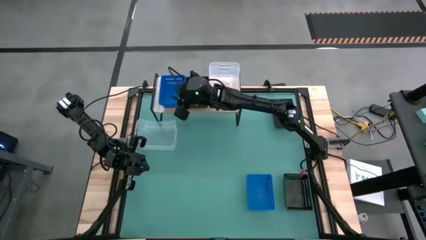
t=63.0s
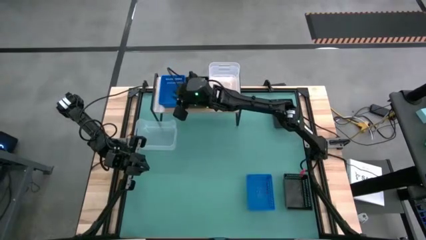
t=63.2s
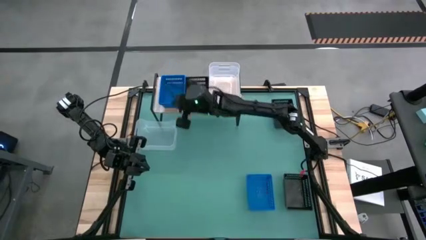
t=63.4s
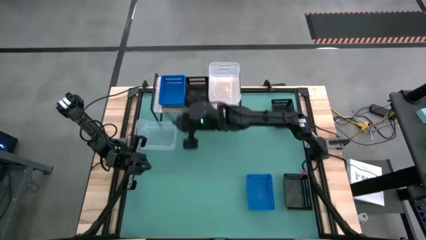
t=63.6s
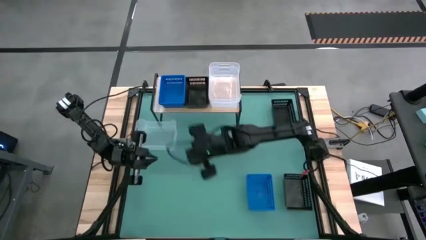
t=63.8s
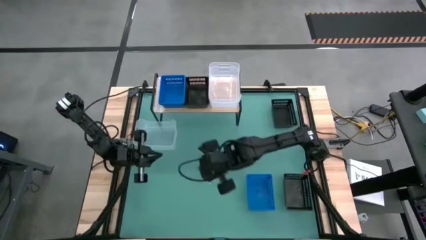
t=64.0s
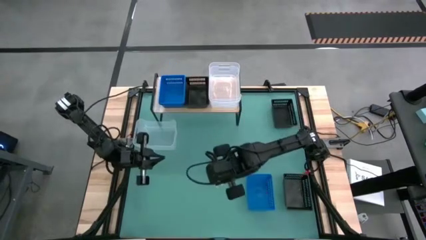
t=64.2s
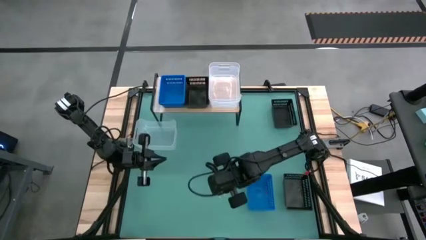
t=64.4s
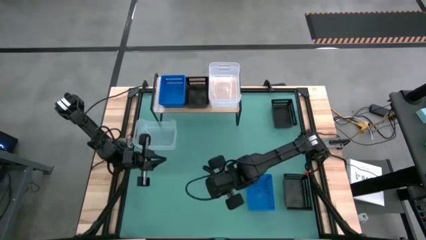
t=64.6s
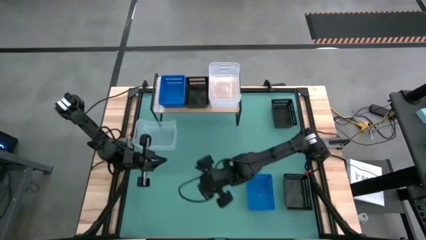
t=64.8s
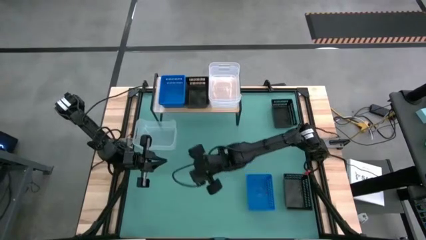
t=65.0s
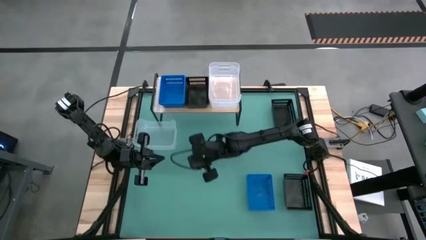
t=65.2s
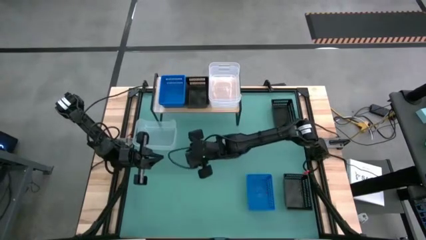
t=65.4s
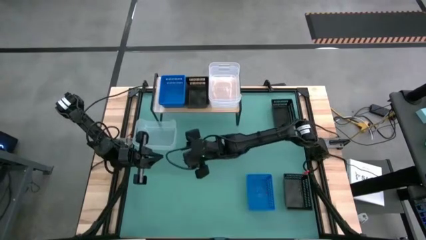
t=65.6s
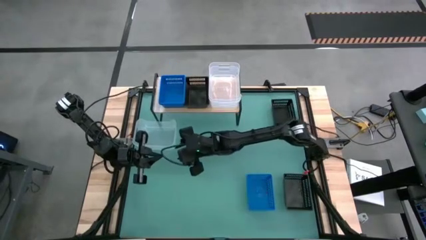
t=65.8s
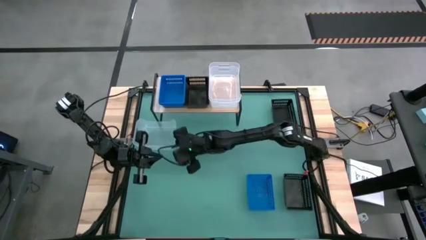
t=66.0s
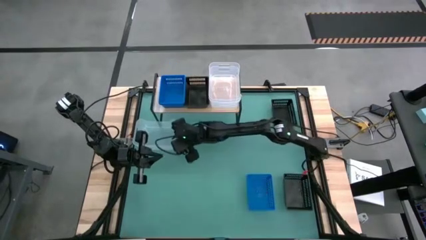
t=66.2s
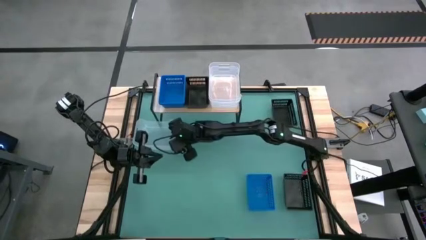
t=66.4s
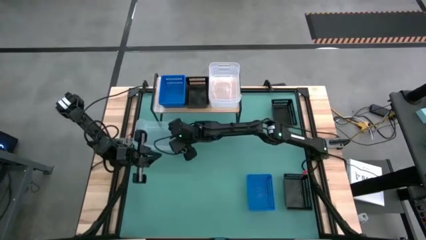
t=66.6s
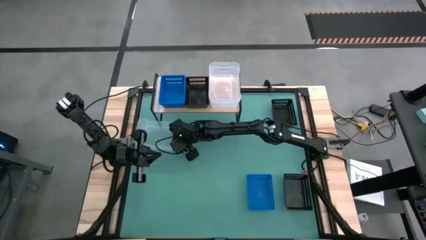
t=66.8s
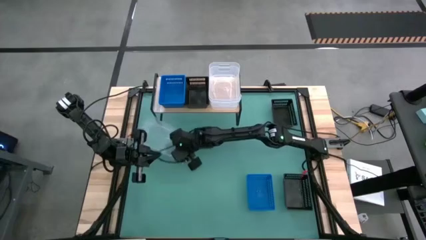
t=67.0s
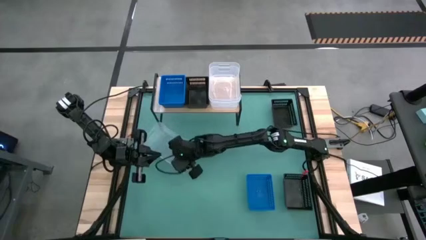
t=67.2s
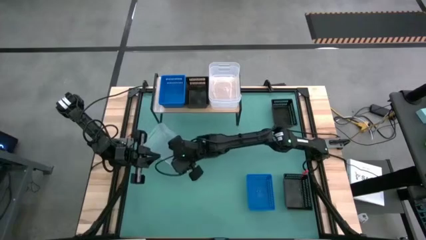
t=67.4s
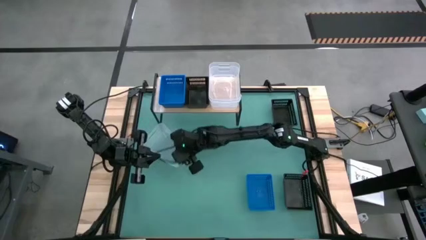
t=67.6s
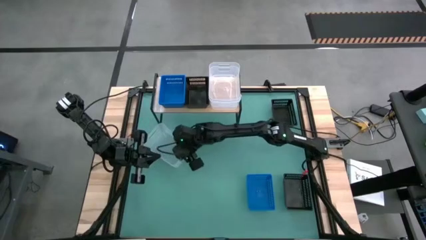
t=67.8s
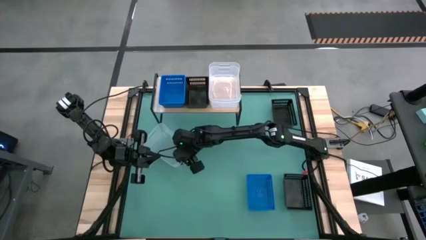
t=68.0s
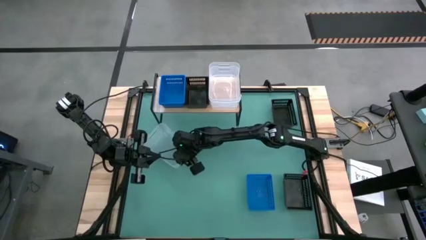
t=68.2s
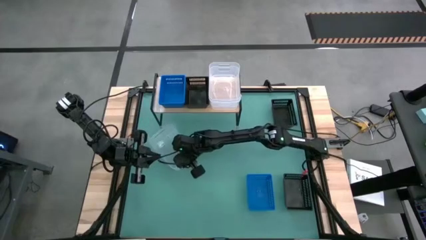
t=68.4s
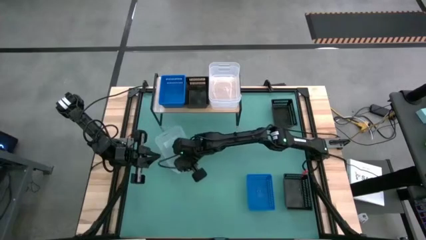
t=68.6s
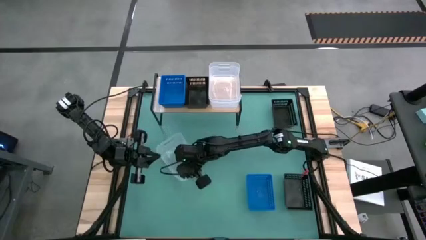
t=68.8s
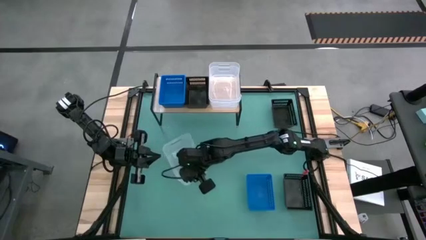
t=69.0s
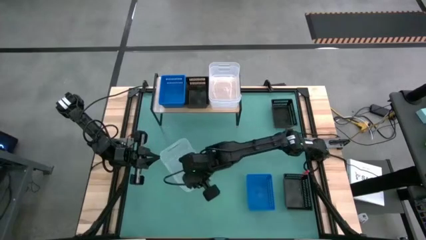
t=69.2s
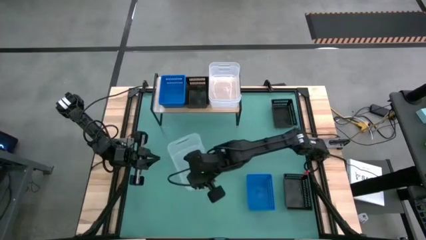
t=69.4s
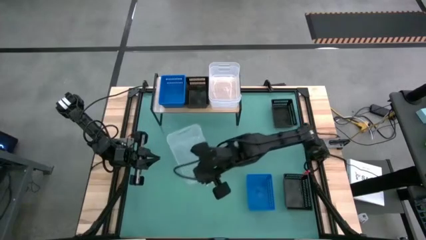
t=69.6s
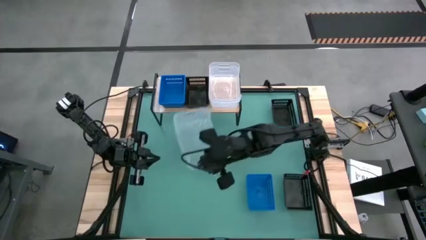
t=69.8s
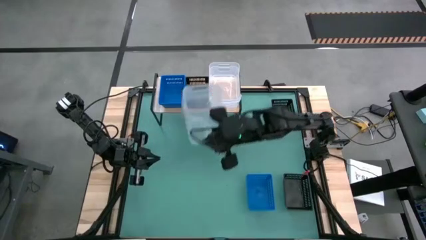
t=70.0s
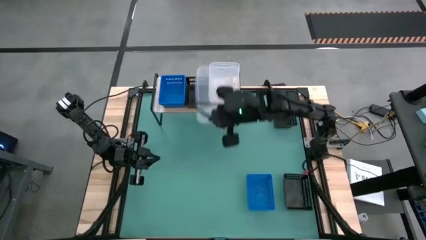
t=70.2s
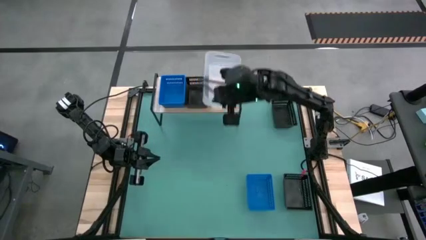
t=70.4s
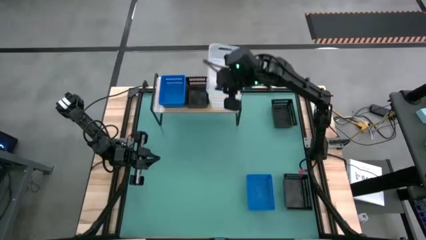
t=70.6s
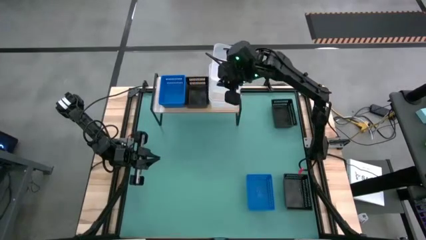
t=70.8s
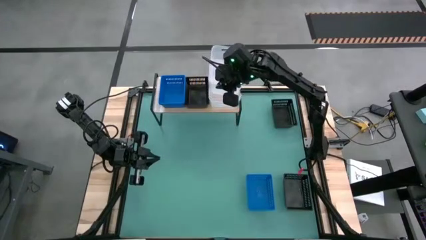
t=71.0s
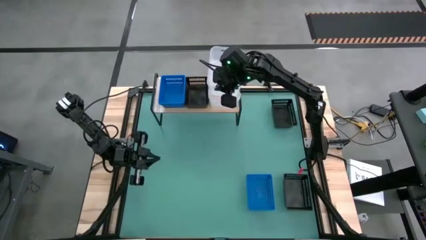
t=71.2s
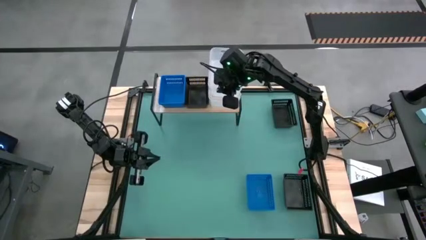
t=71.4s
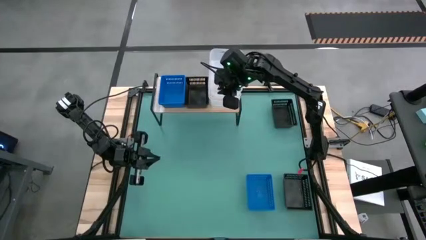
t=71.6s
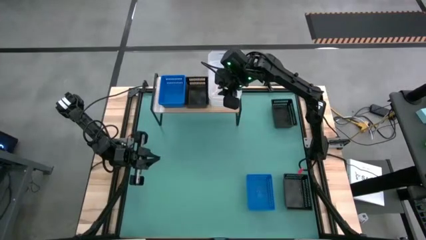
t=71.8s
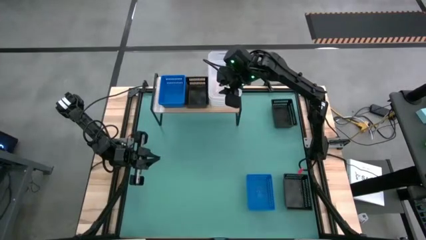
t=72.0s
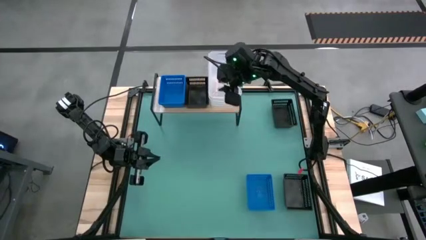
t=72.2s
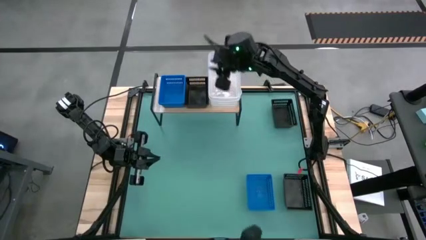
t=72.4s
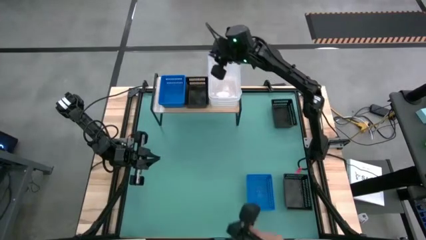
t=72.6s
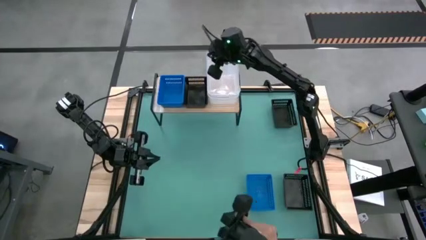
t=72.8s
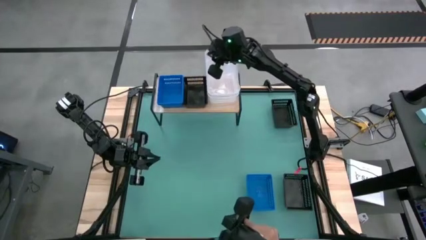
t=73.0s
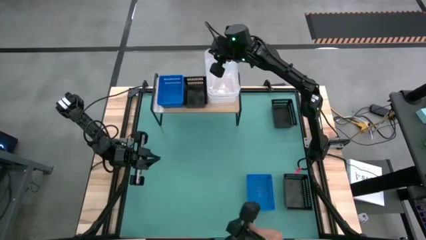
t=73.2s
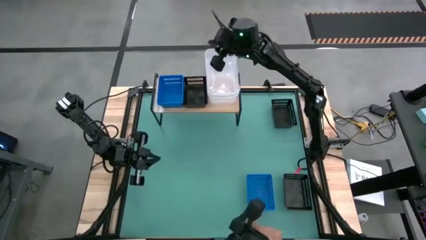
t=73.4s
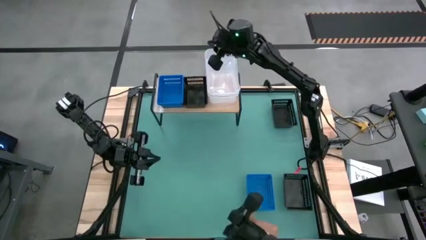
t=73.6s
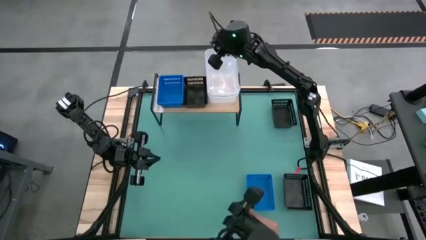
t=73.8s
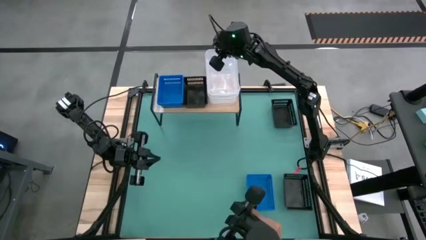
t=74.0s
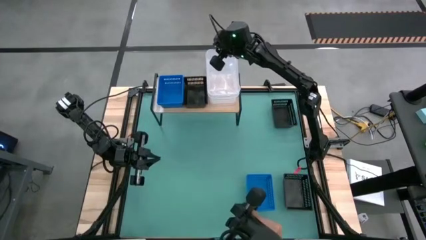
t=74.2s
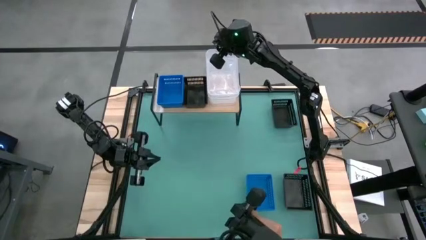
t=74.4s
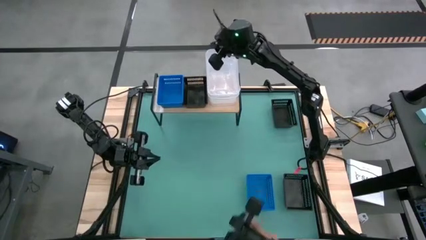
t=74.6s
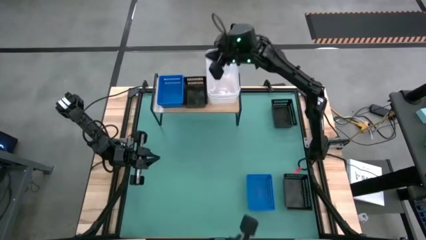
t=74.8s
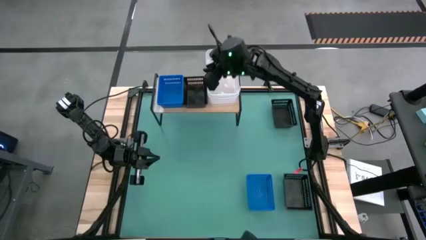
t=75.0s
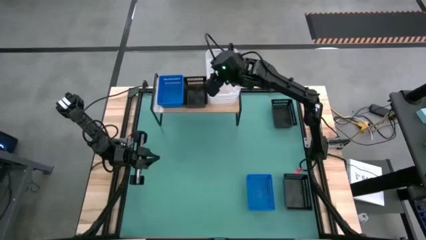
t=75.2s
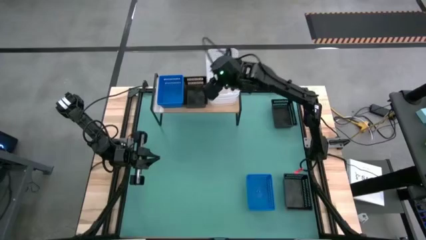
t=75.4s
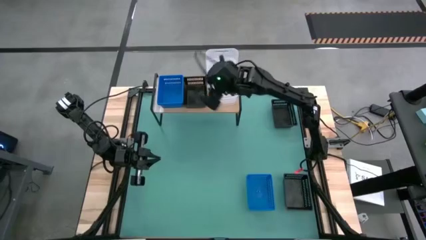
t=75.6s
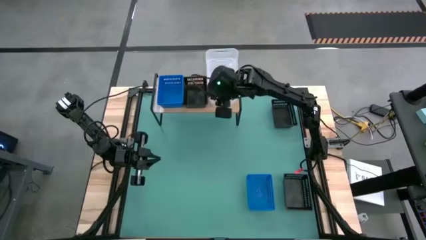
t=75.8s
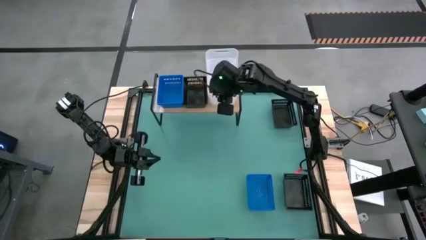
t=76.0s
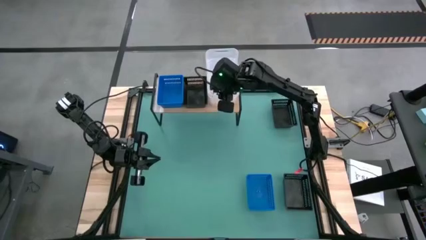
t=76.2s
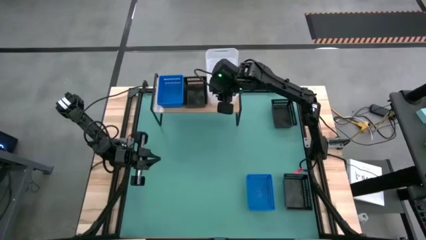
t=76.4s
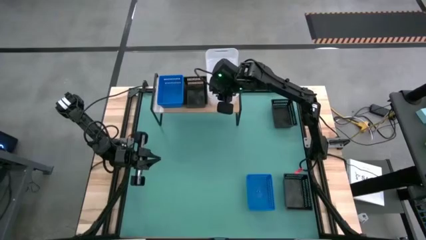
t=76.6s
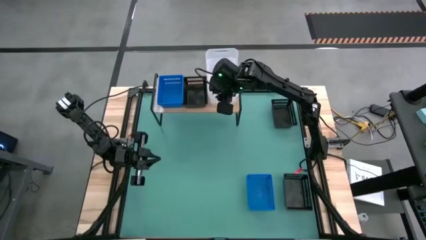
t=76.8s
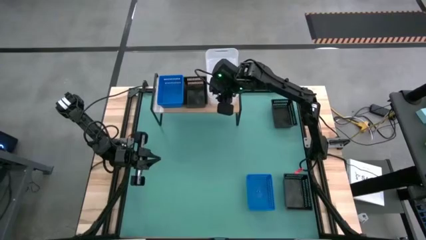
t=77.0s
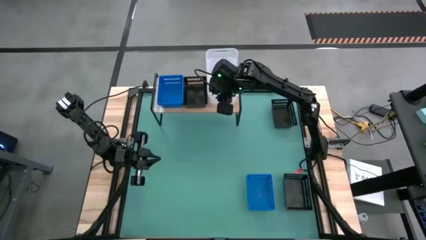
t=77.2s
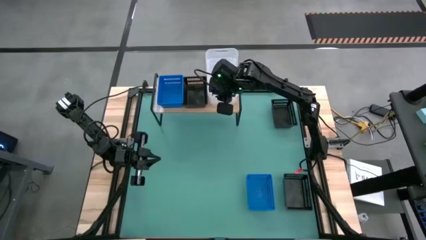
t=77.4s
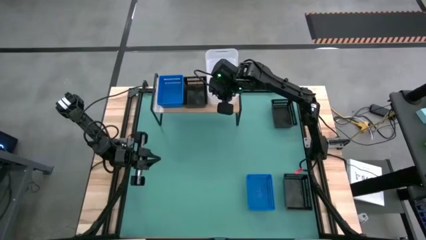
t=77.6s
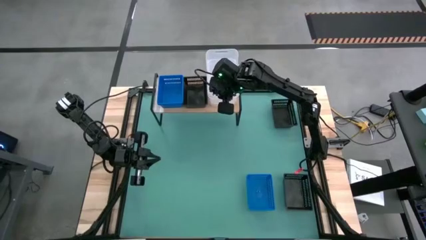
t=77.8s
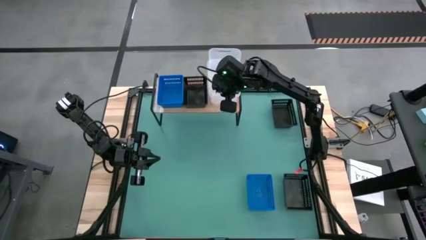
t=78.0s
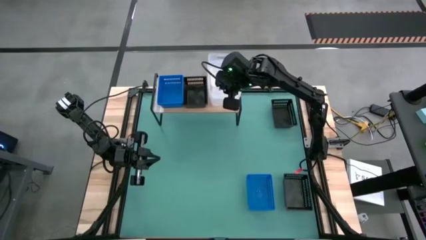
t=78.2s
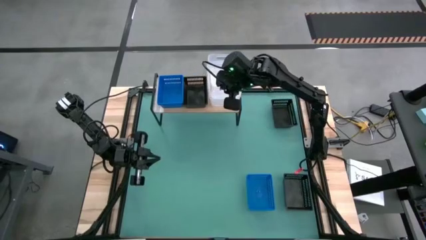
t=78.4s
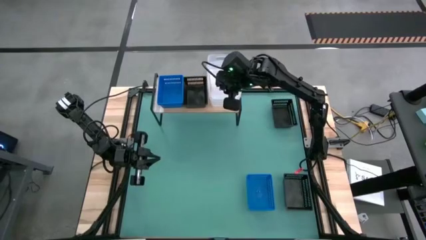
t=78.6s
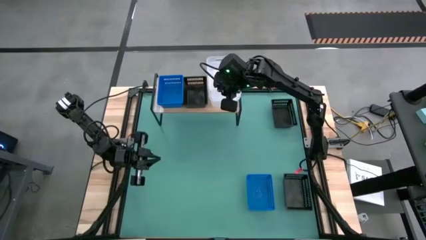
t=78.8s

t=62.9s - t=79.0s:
Task: Stack baskets on shelf by color
Stack the transparent bin on the other transparent bins on the shelf
